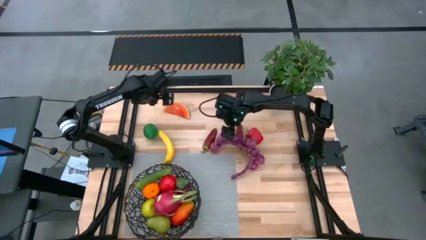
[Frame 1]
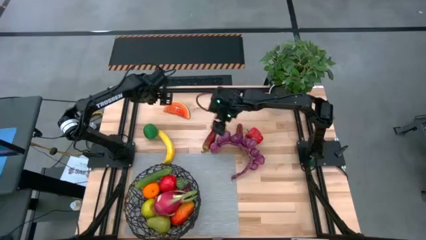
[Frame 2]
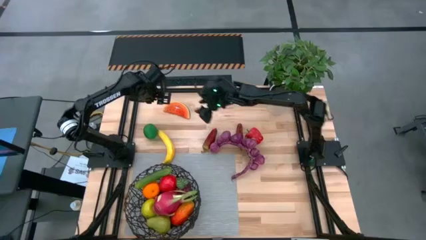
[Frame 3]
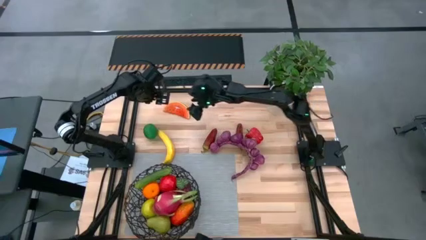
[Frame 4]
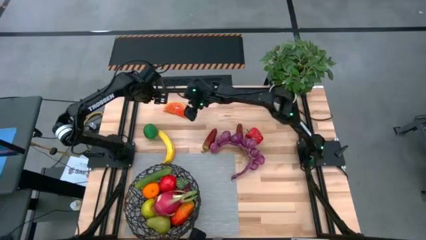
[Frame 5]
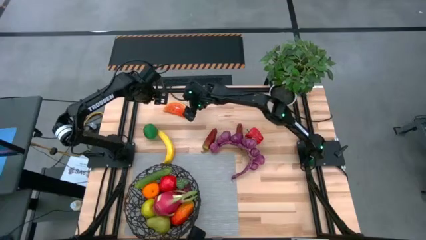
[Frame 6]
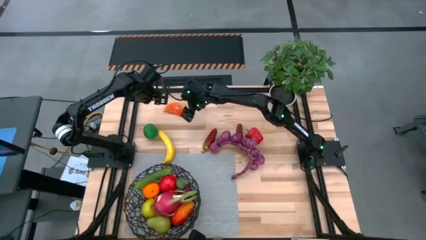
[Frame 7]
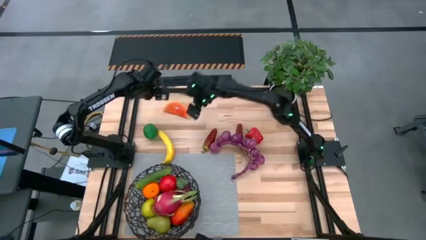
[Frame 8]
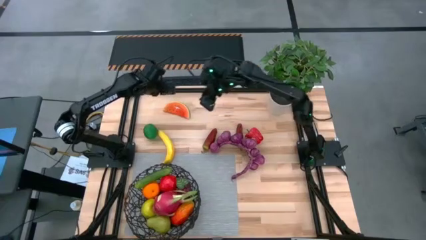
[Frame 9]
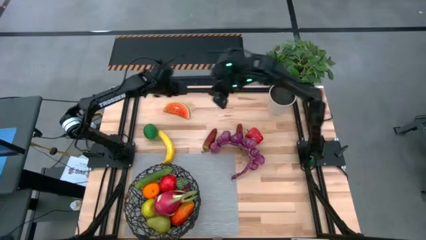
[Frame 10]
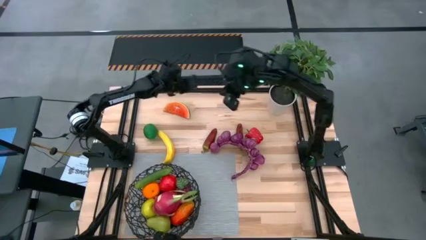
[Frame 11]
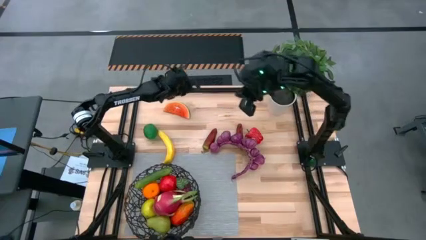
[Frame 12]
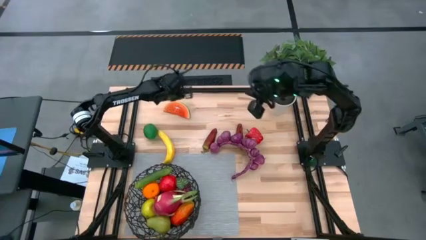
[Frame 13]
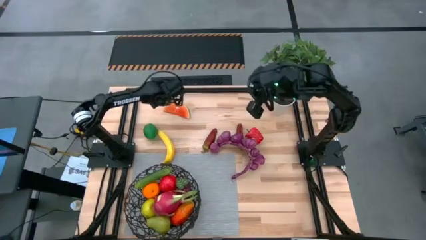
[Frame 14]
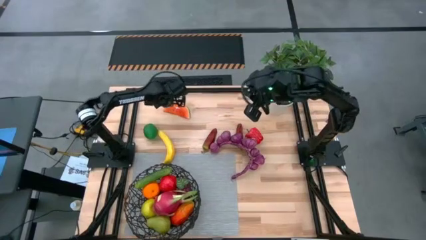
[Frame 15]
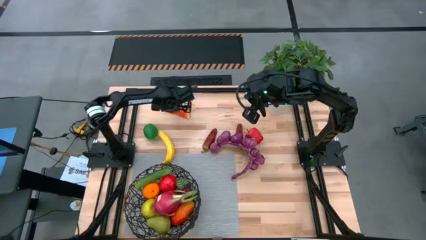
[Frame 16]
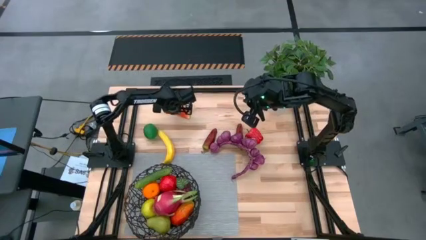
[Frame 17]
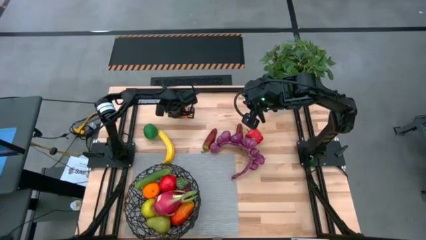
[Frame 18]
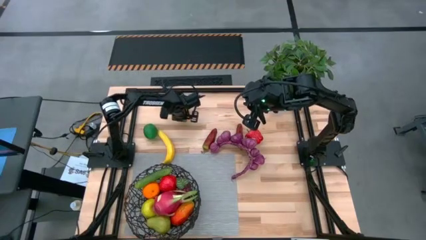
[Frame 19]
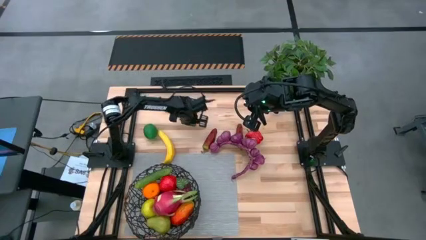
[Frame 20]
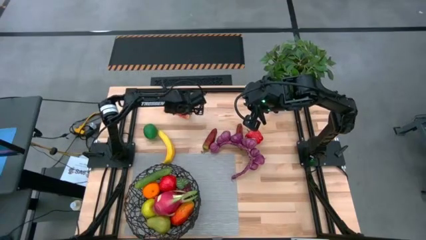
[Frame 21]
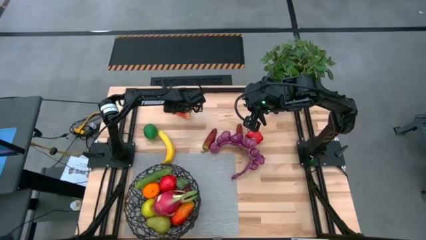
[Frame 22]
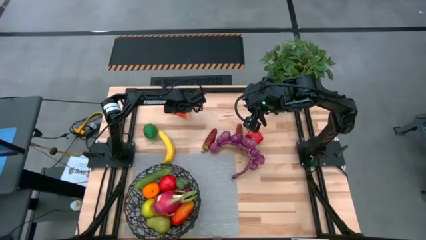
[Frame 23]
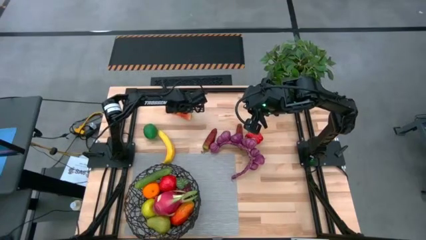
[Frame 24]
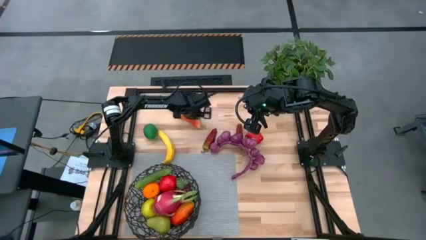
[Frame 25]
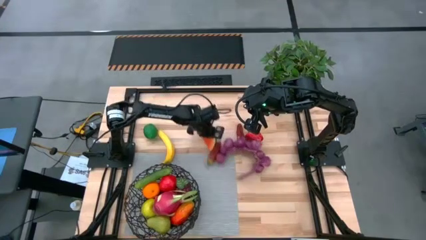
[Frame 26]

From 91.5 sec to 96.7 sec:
Task: Build produce basket
Move the watermelon to the center of the table

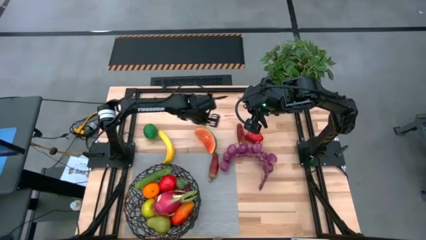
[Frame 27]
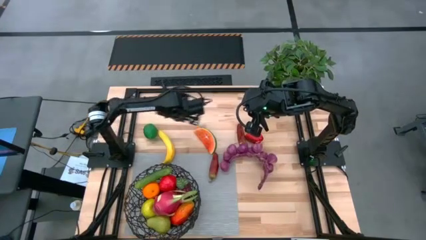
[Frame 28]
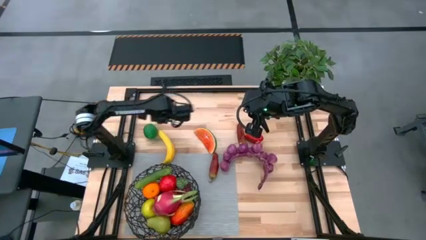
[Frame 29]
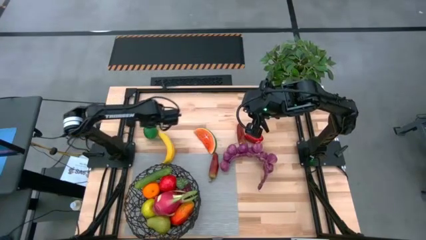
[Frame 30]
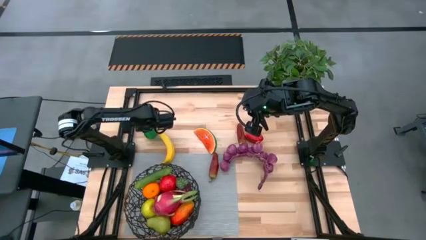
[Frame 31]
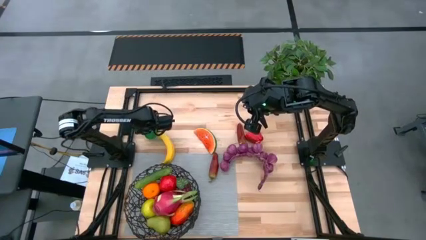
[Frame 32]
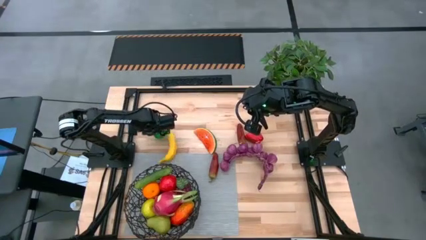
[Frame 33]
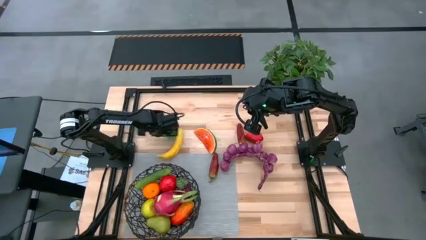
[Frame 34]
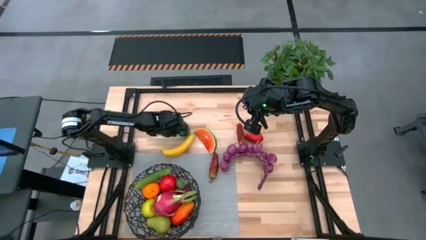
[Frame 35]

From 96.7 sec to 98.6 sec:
Move the lime to the center of the table

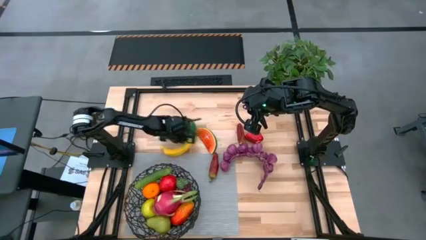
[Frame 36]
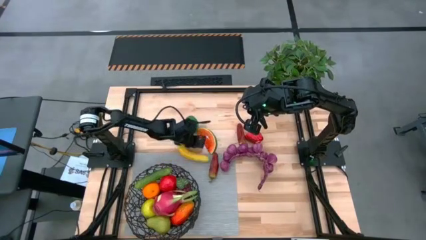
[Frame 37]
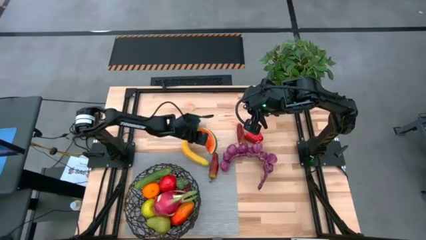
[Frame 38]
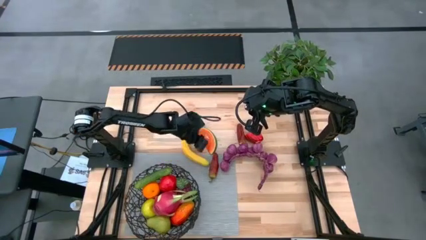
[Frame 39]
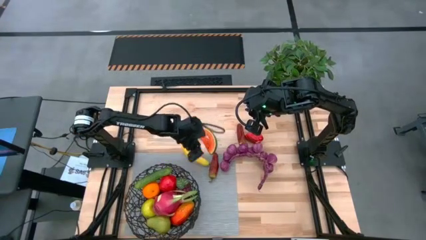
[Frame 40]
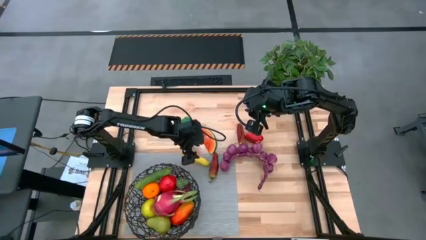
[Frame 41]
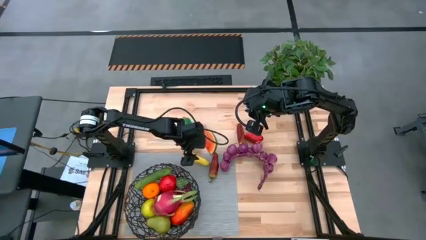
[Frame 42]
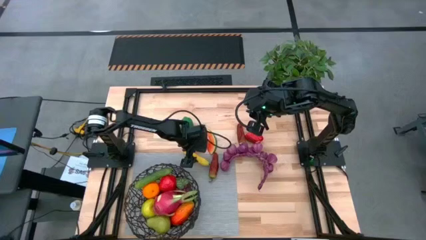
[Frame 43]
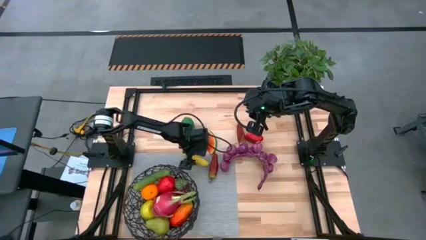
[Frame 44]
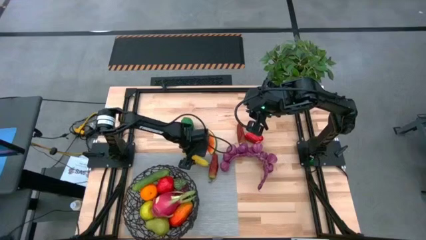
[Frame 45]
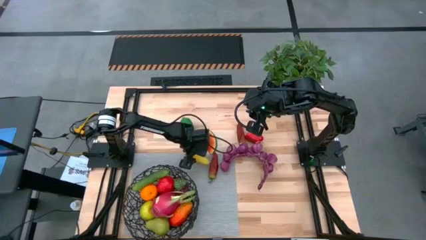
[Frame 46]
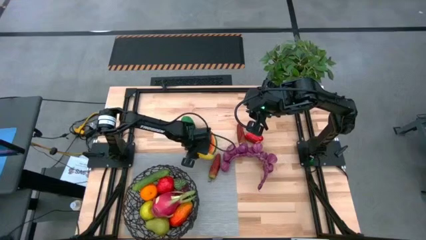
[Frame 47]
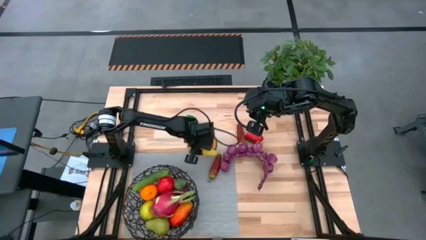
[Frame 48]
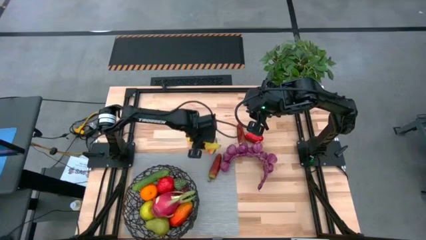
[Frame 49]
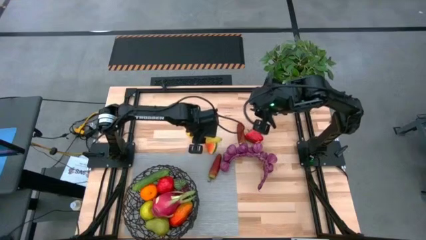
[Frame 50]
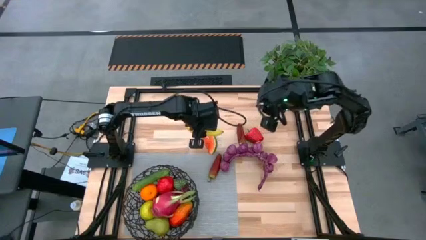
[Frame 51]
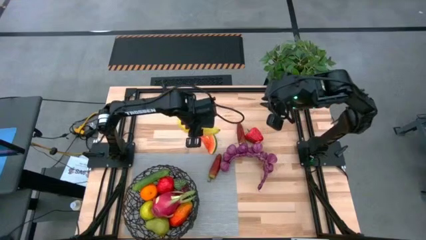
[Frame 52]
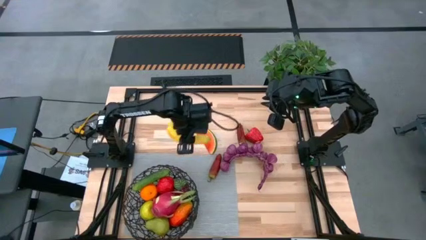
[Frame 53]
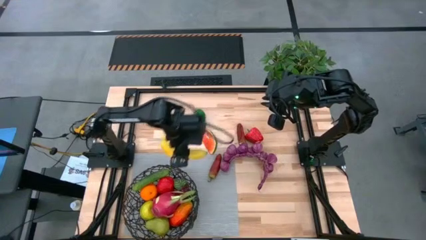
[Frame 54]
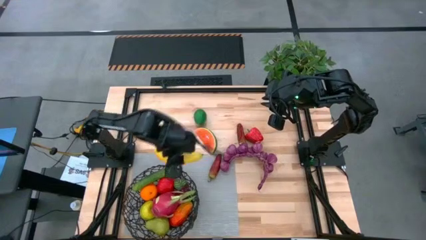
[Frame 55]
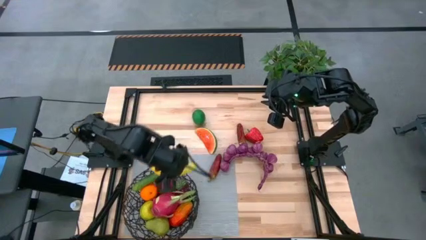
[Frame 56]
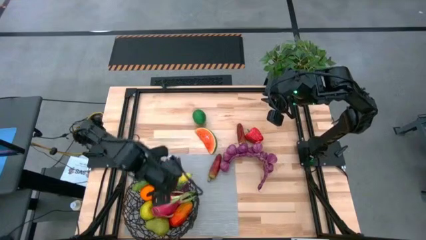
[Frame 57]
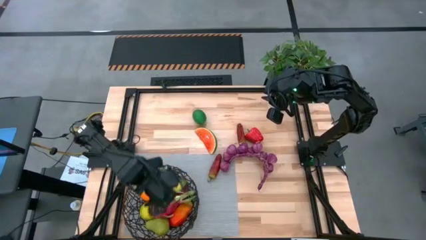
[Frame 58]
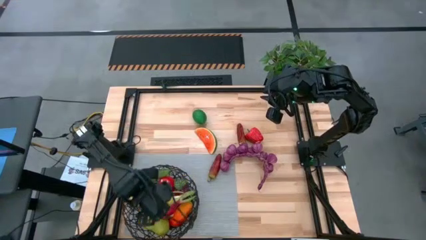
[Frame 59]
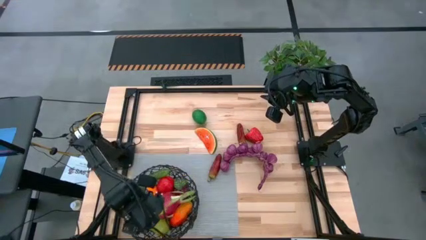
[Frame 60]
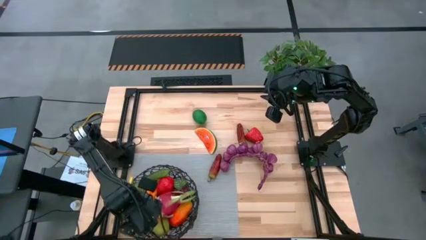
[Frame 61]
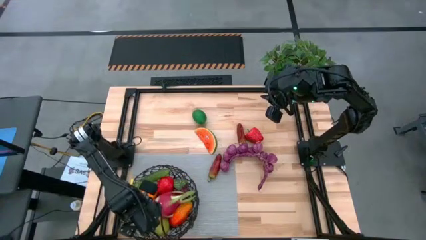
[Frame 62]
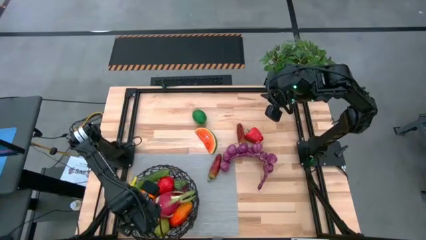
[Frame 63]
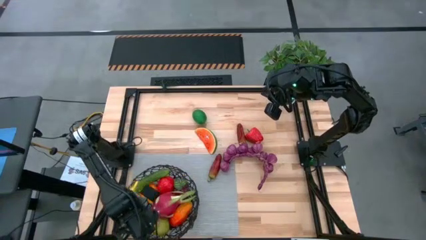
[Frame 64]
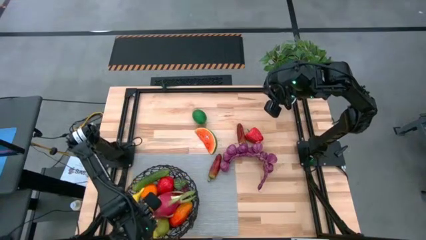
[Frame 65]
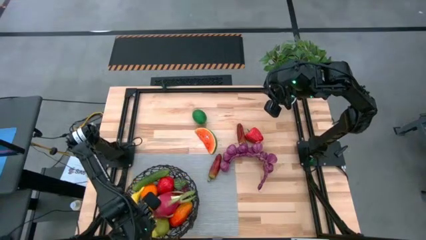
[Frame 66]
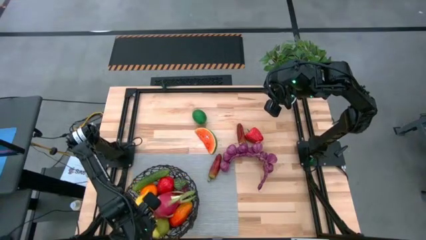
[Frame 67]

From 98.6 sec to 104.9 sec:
Put the banana into the black wire basket

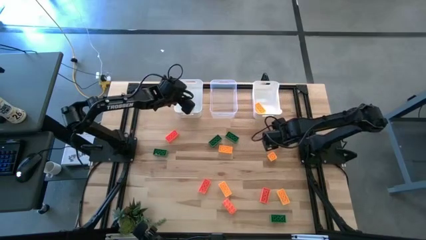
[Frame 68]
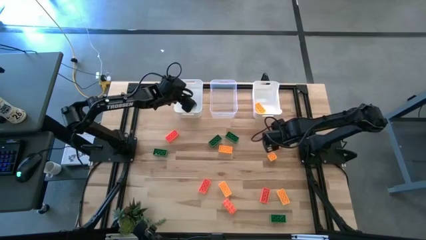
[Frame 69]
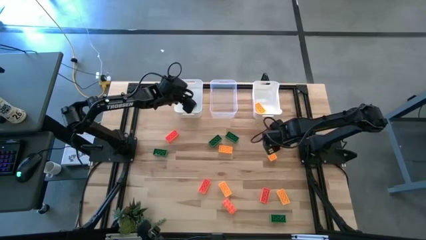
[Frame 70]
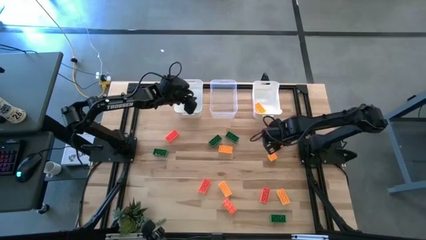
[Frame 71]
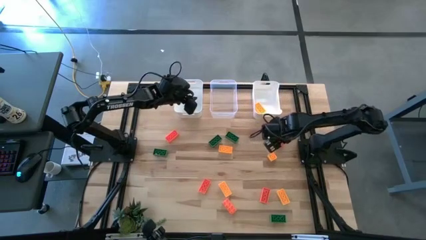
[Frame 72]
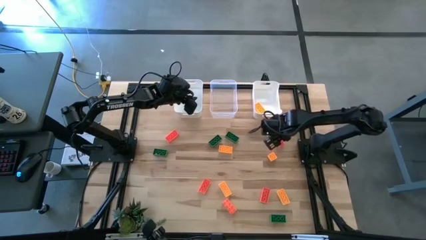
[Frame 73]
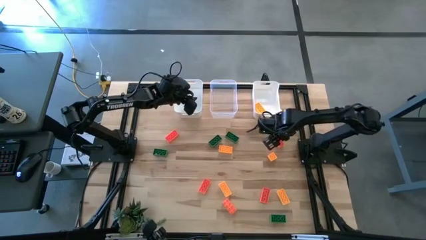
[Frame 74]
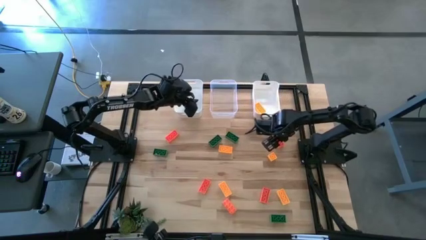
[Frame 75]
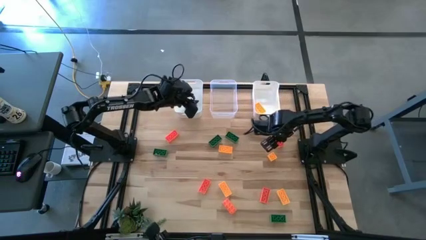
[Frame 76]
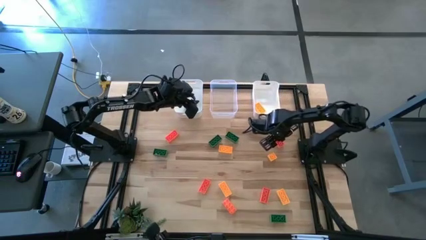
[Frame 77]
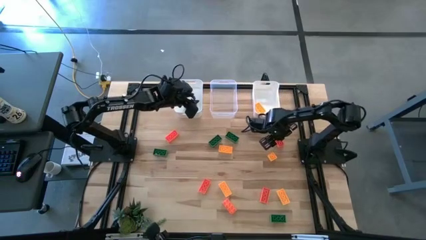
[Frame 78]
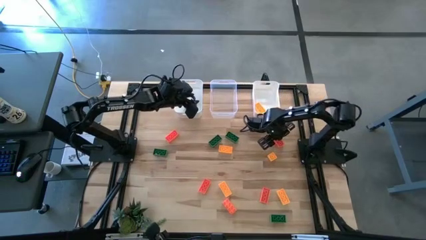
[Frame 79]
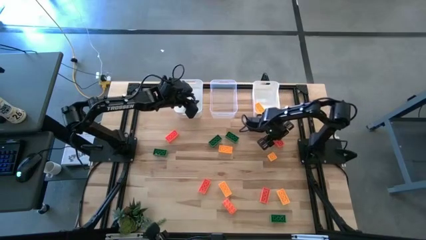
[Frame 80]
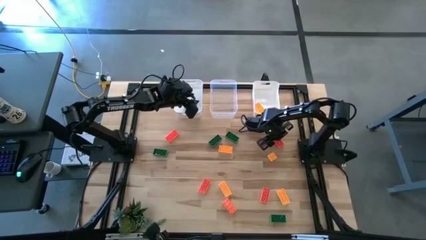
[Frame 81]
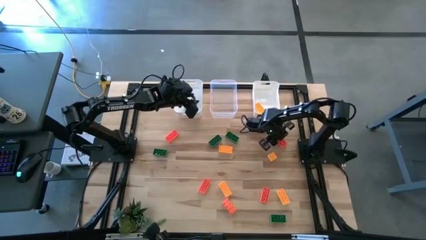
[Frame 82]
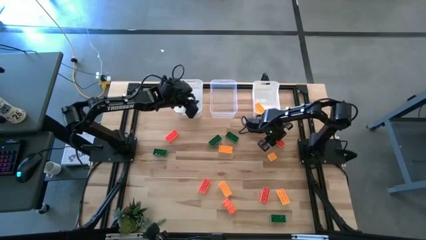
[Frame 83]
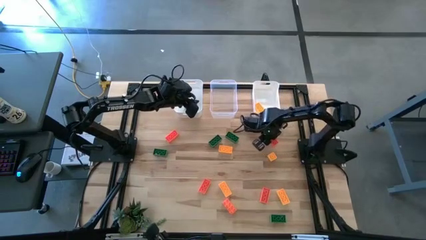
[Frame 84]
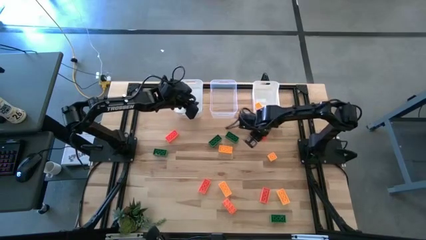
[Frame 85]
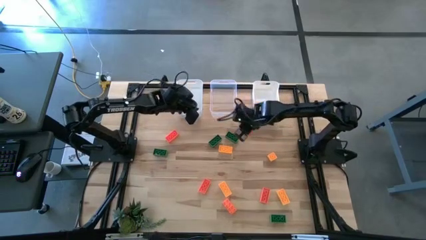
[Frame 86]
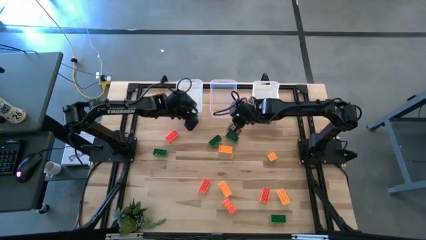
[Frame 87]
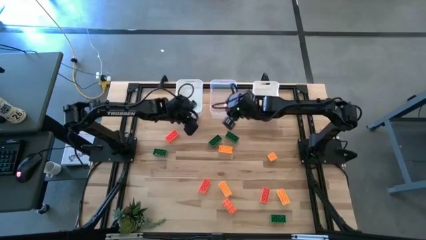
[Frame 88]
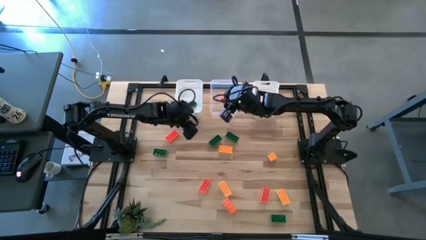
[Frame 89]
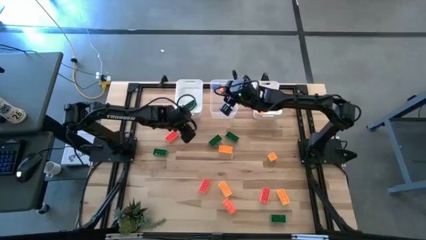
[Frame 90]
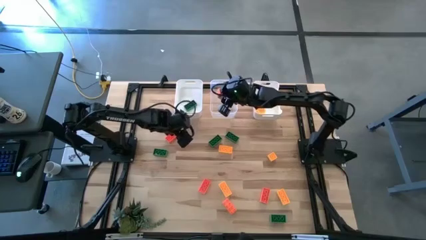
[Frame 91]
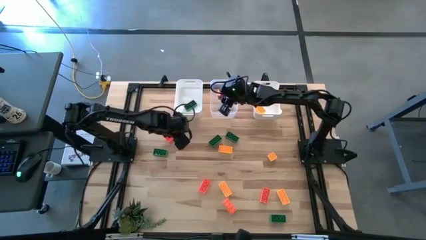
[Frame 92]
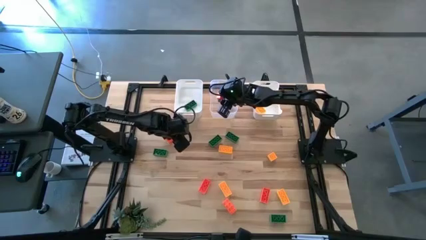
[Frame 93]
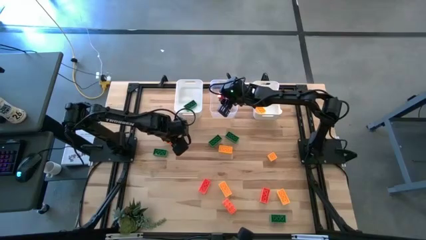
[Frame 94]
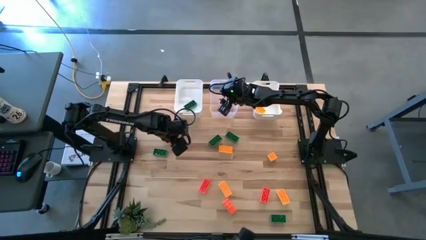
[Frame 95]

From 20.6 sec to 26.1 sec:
Task: Sort & place blocks by color
Put the orange game piece into the transparent bin
